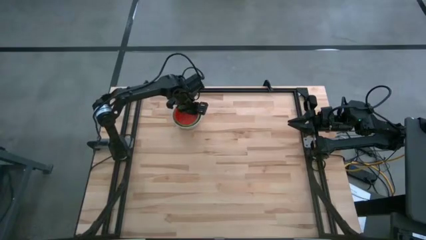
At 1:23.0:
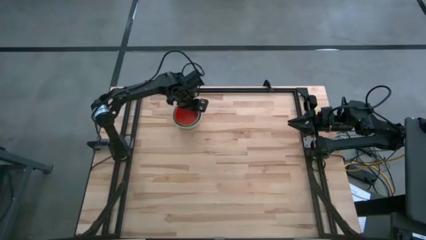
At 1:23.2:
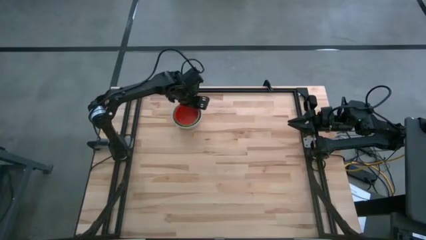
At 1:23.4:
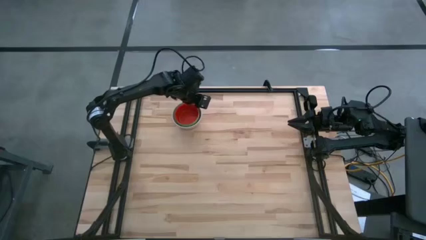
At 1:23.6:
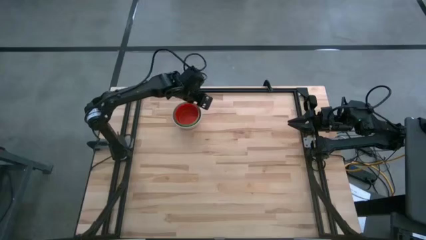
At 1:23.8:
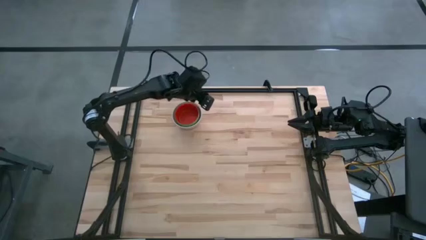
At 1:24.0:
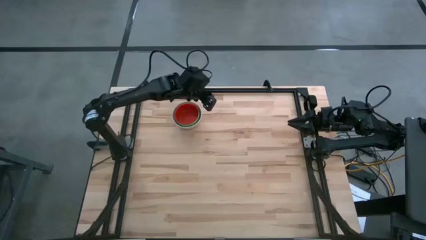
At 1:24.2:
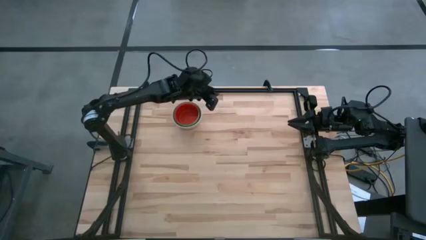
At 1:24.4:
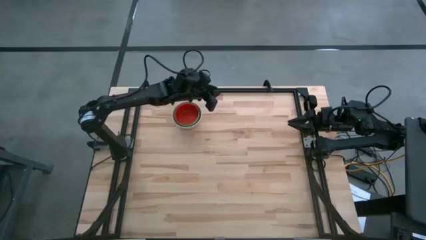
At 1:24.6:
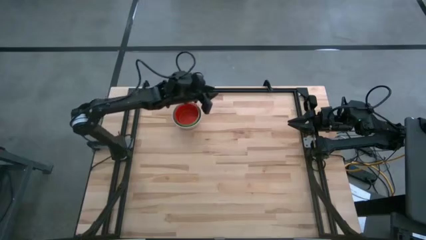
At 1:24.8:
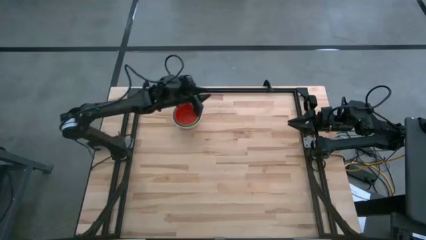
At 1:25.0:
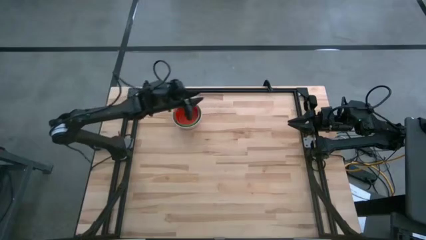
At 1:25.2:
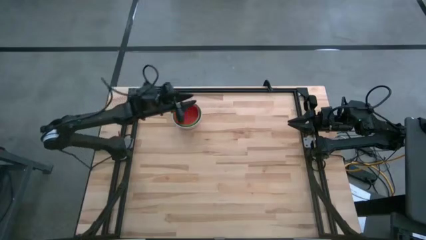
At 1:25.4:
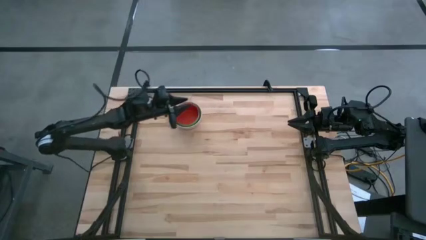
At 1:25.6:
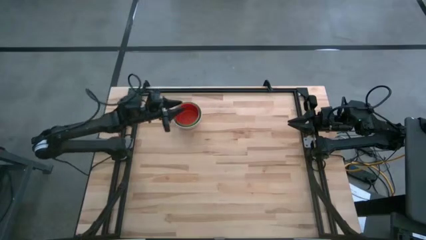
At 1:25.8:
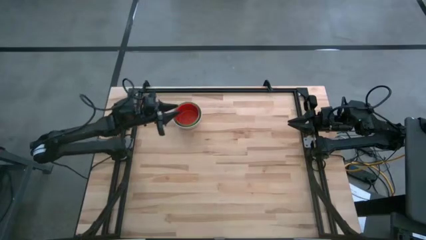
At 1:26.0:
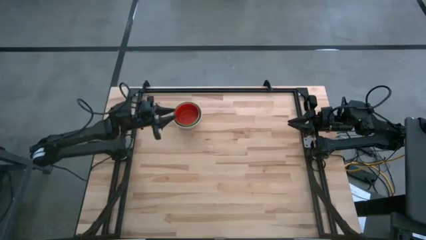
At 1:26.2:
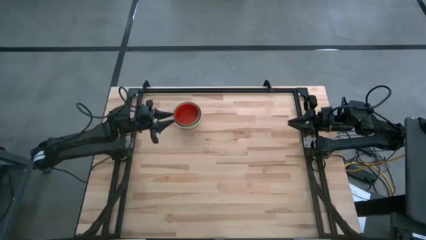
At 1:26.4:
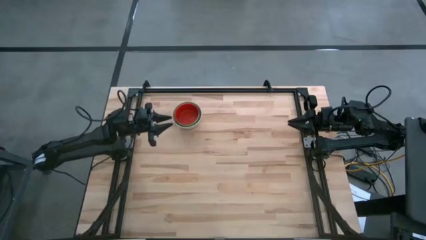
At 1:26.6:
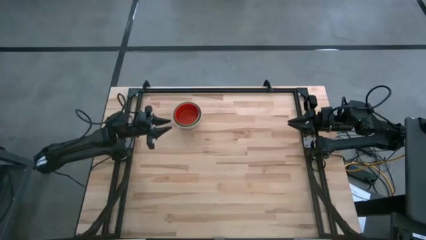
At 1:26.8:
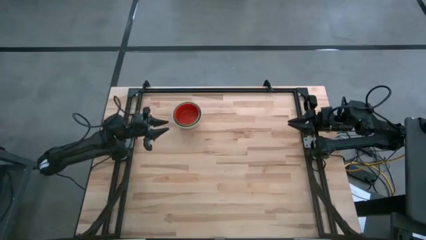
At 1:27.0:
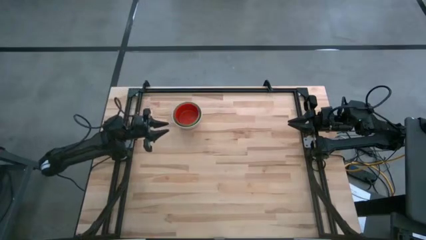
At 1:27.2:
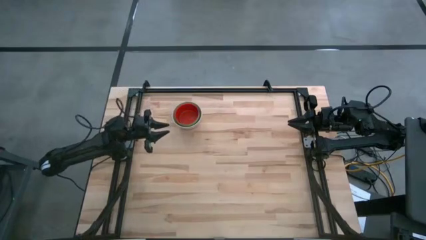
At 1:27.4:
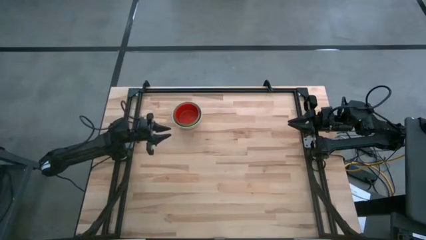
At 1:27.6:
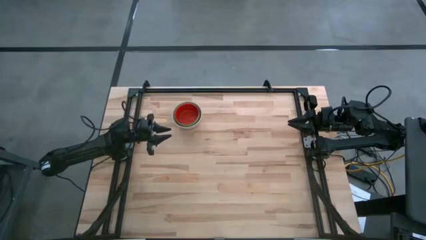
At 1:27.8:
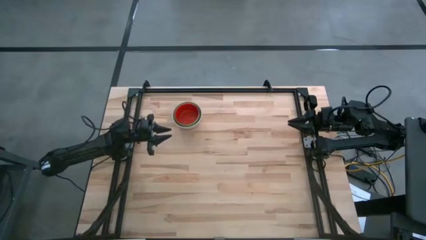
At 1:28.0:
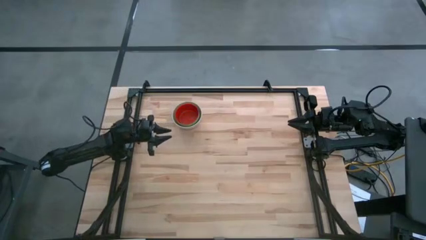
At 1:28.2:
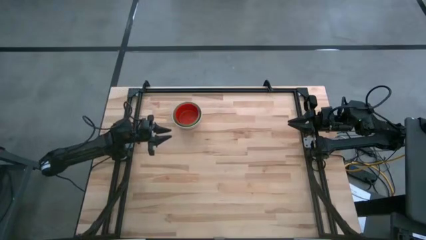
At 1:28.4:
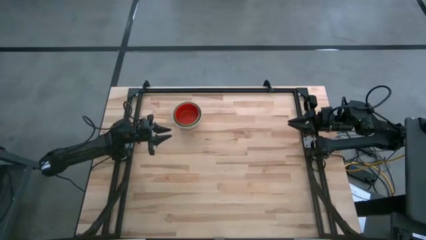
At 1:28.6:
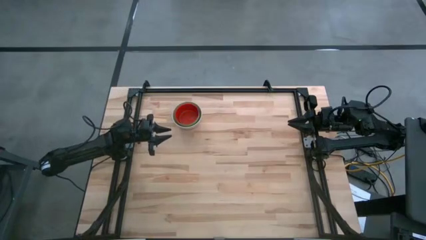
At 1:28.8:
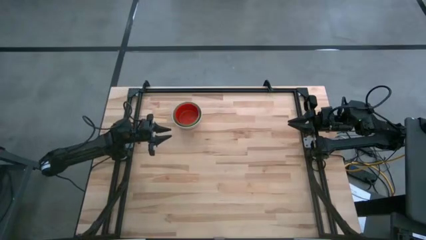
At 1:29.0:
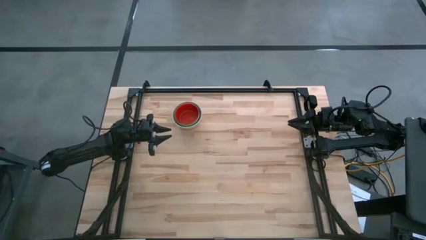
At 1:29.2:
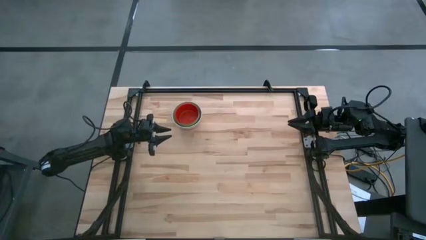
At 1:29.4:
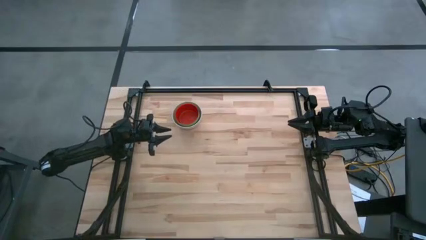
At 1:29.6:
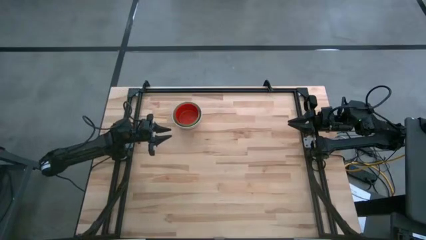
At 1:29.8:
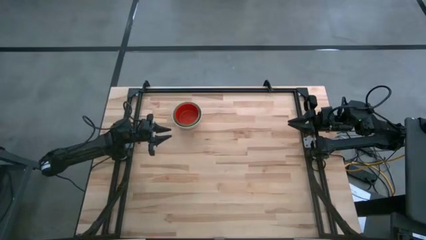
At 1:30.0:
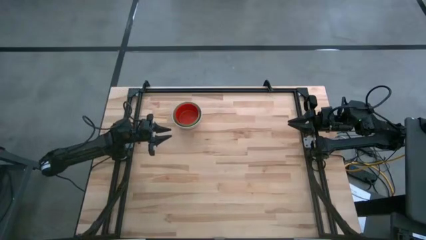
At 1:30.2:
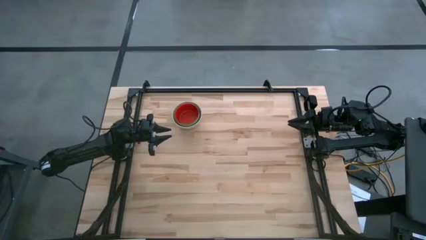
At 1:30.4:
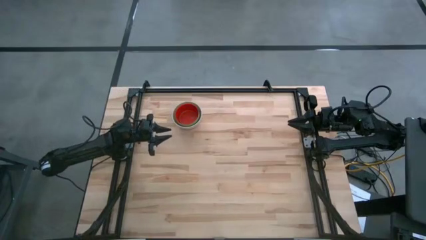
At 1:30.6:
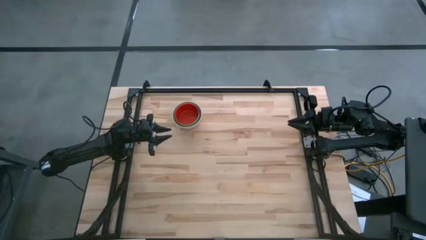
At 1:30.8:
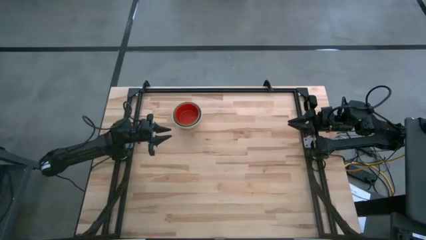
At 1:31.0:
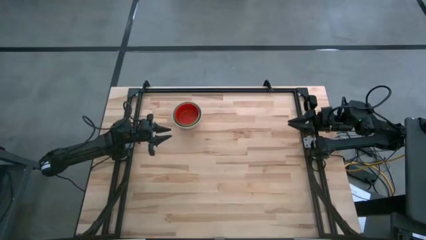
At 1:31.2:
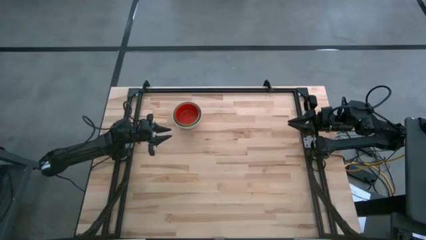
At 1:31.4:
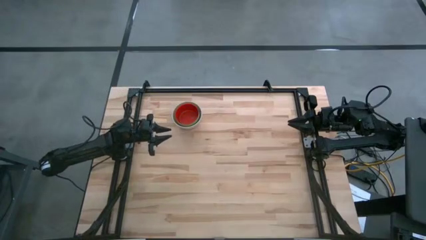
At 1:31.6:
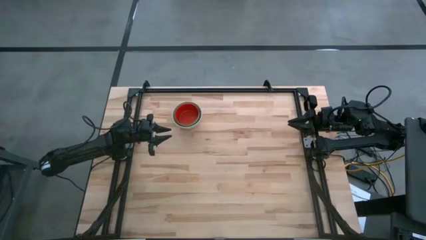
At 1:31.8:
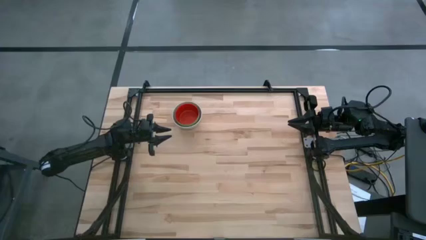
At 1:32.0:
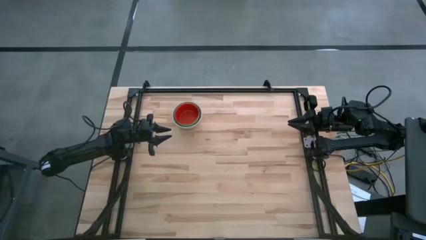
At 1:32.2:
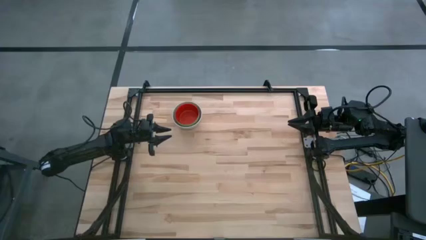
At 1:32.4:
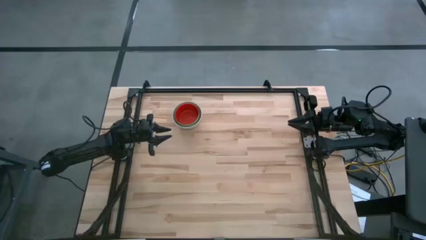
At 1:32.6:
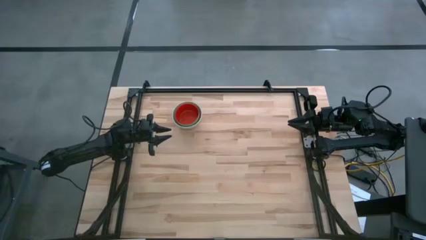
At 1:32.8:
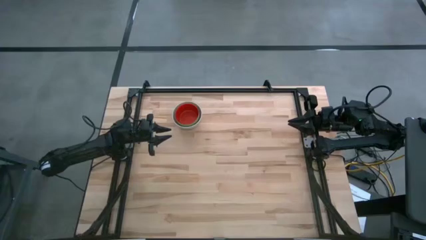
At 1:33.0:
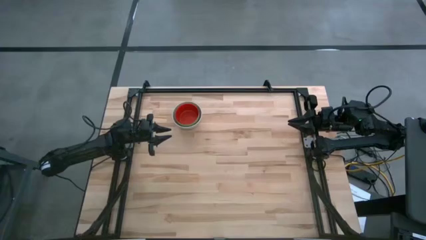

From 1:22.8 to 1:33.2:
Return to Home Position
